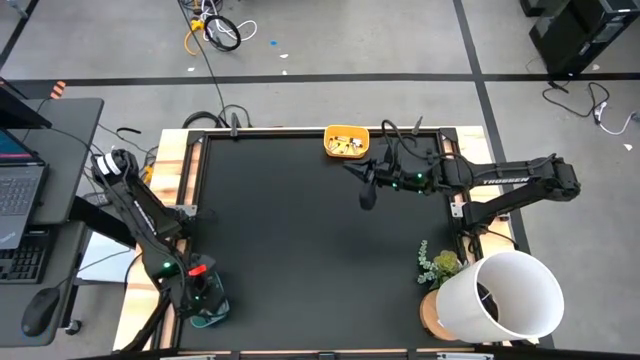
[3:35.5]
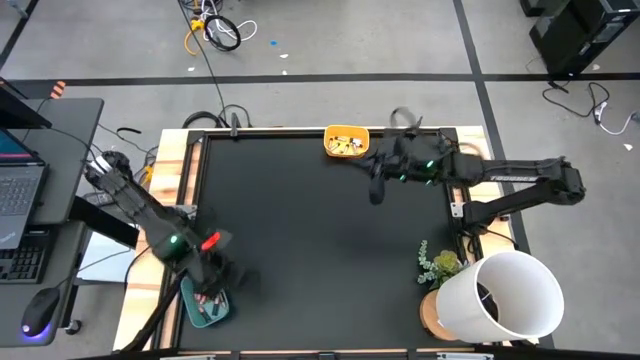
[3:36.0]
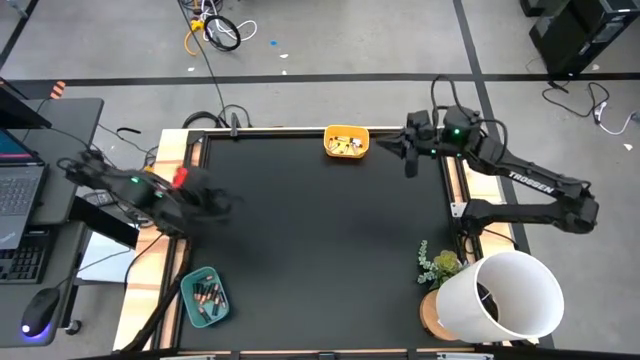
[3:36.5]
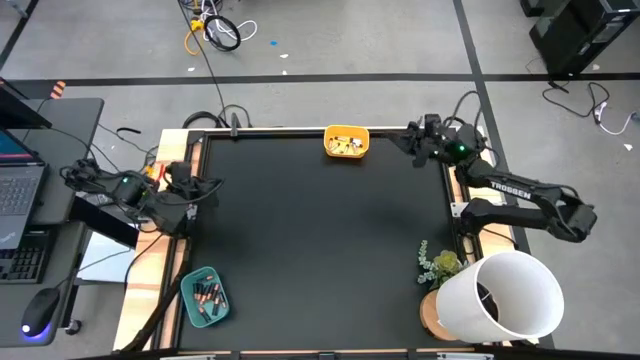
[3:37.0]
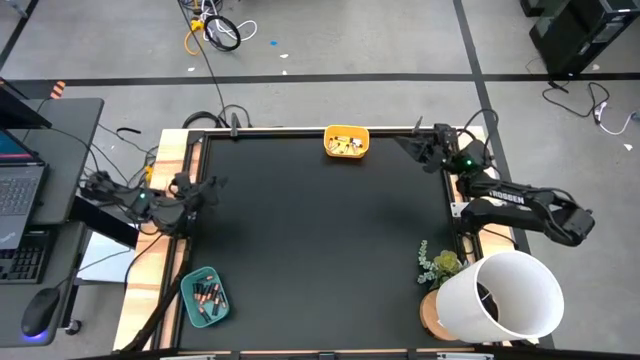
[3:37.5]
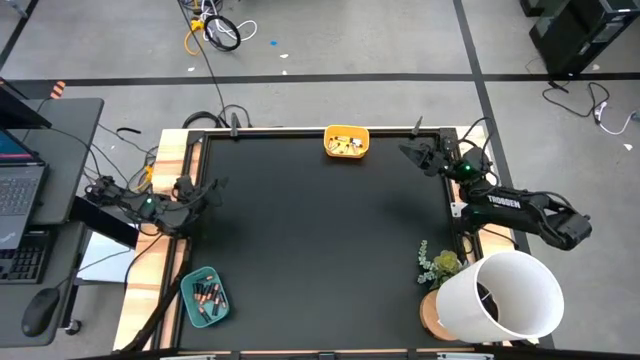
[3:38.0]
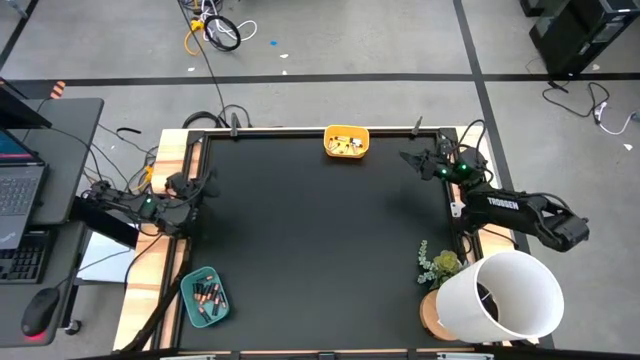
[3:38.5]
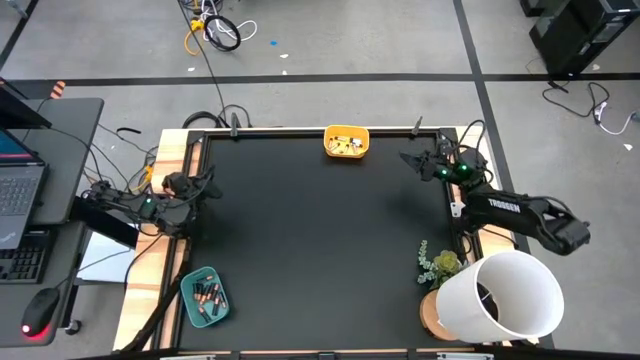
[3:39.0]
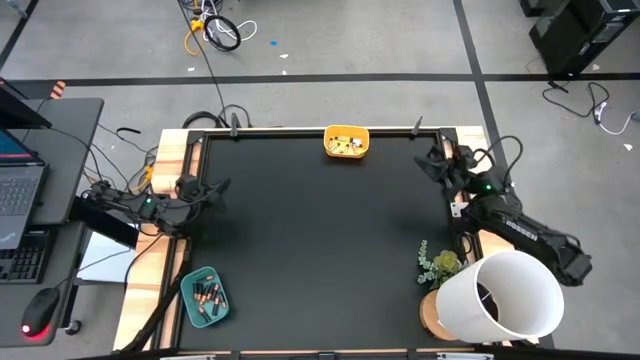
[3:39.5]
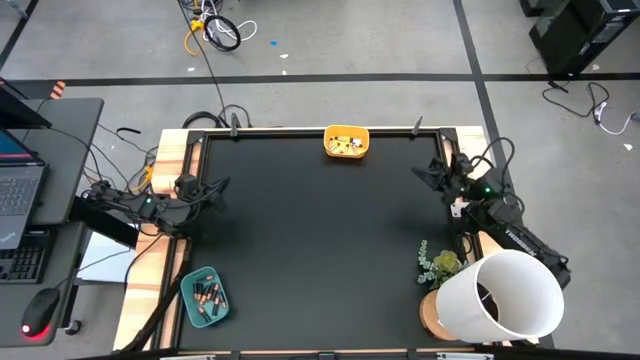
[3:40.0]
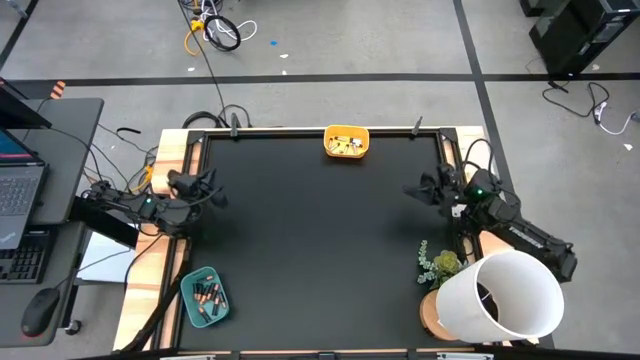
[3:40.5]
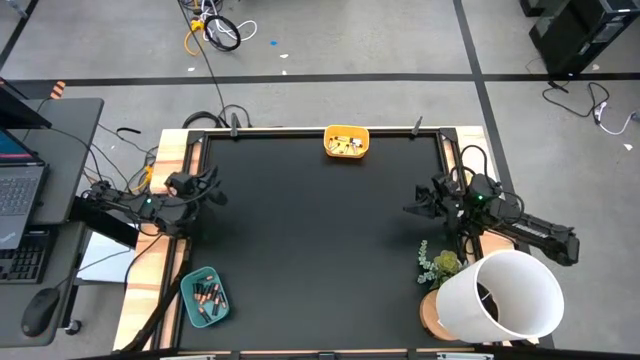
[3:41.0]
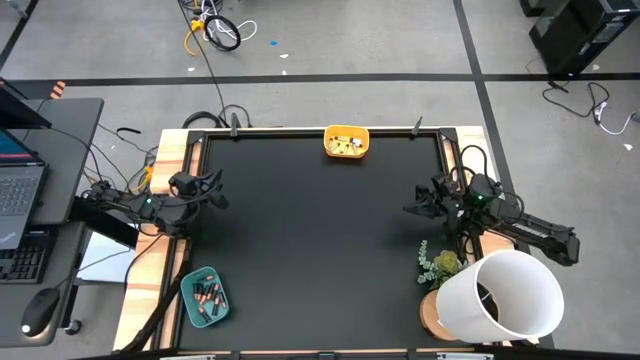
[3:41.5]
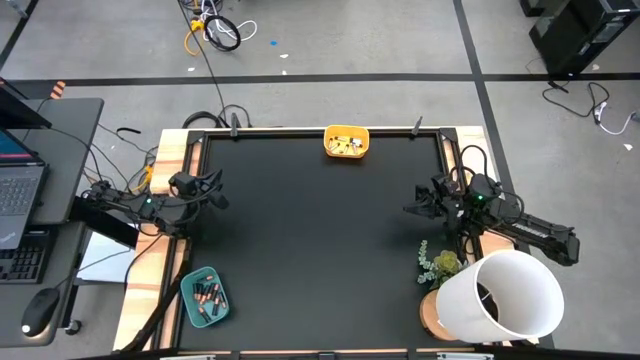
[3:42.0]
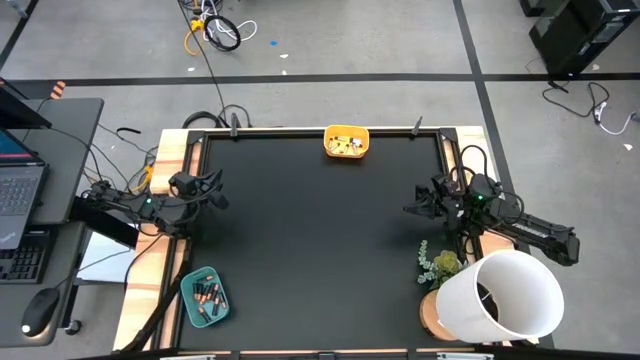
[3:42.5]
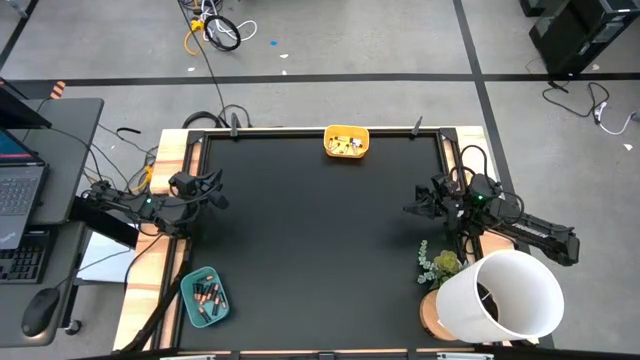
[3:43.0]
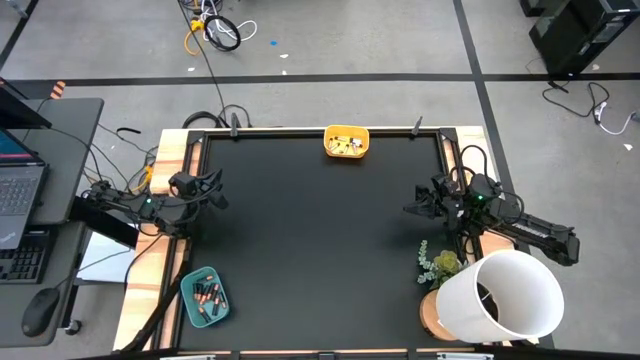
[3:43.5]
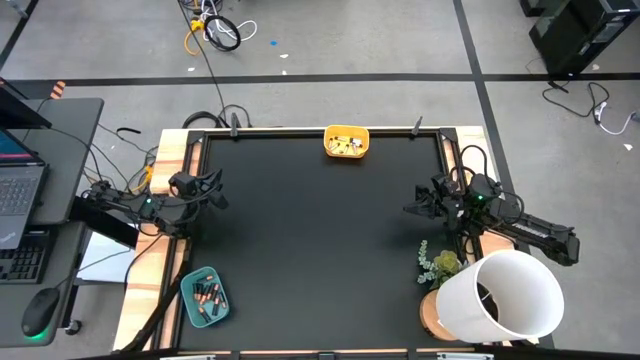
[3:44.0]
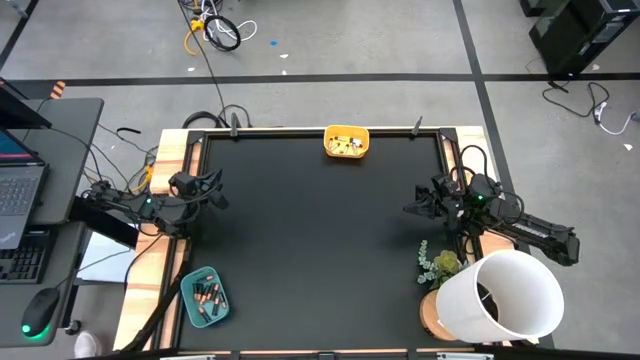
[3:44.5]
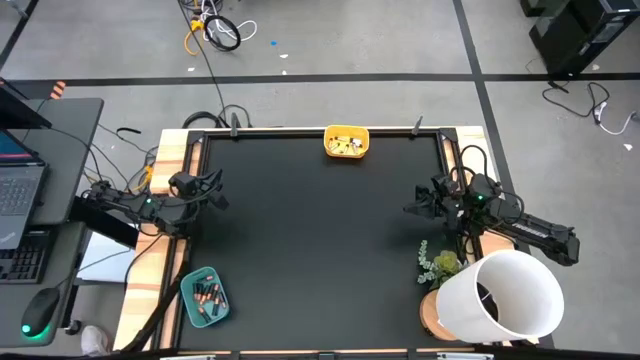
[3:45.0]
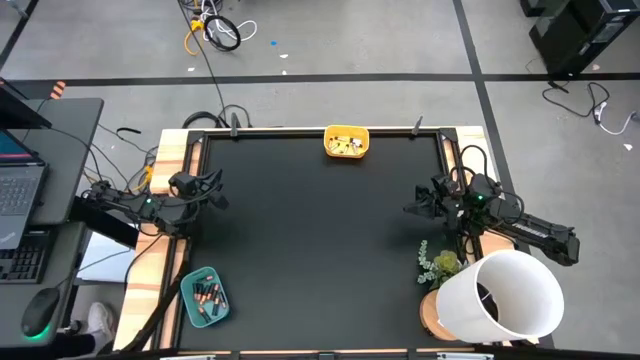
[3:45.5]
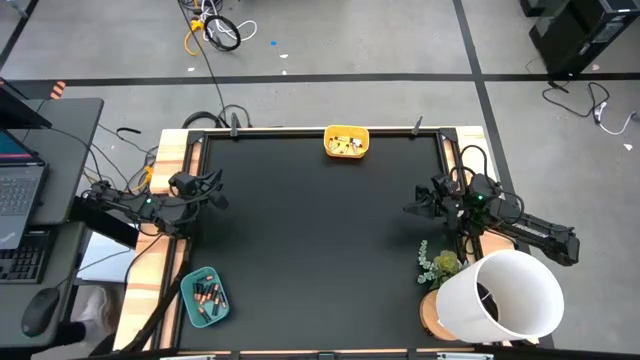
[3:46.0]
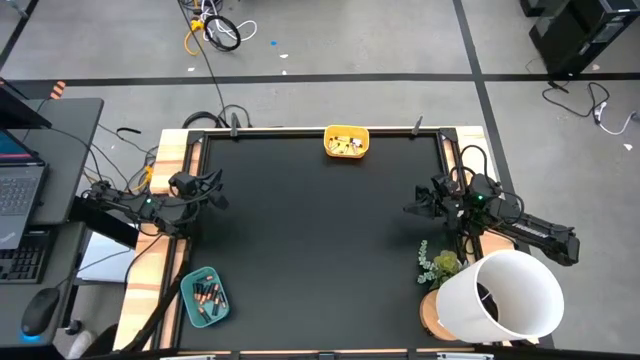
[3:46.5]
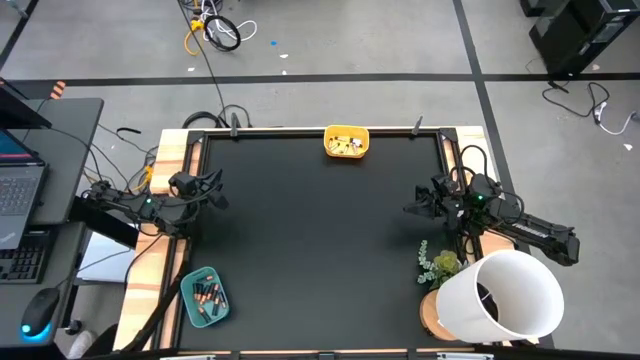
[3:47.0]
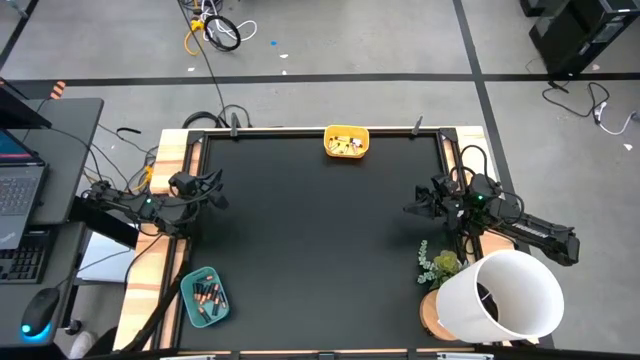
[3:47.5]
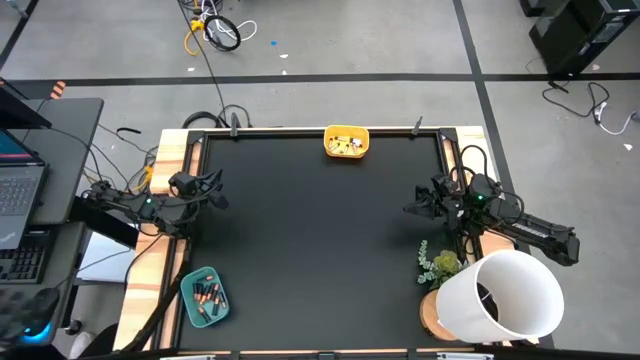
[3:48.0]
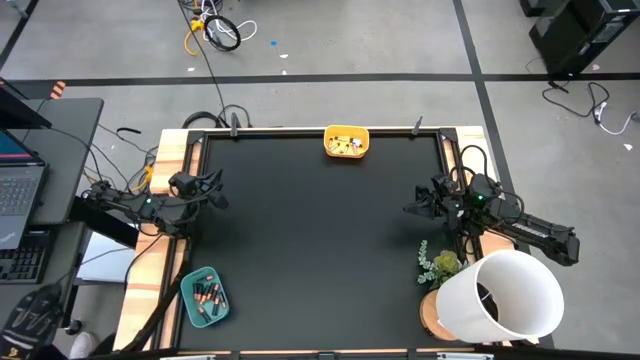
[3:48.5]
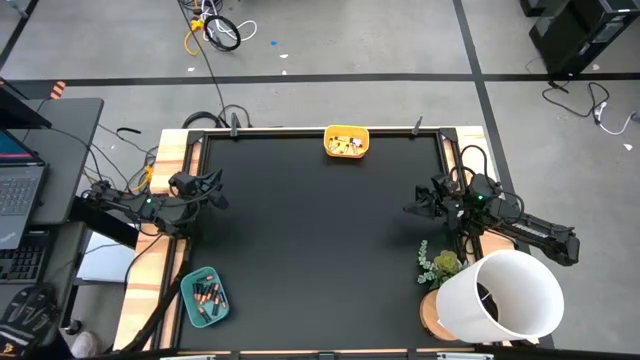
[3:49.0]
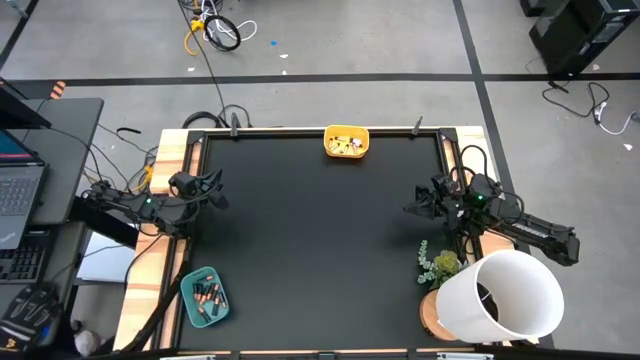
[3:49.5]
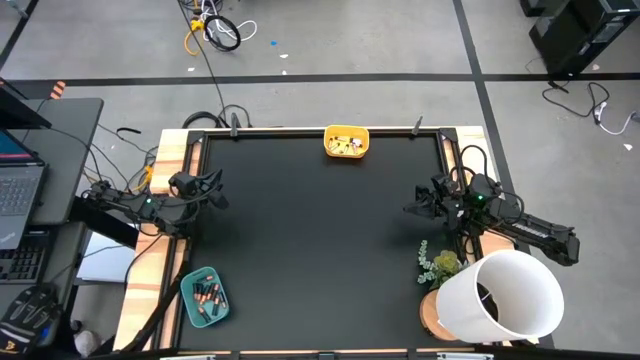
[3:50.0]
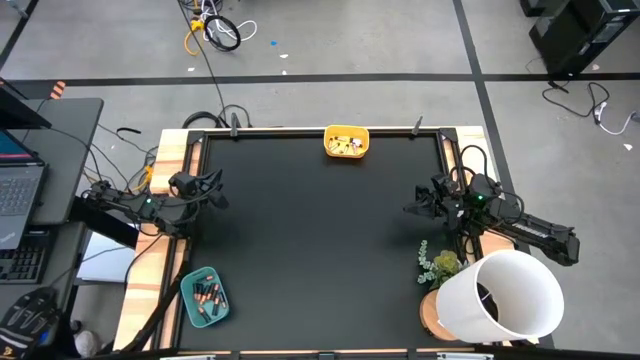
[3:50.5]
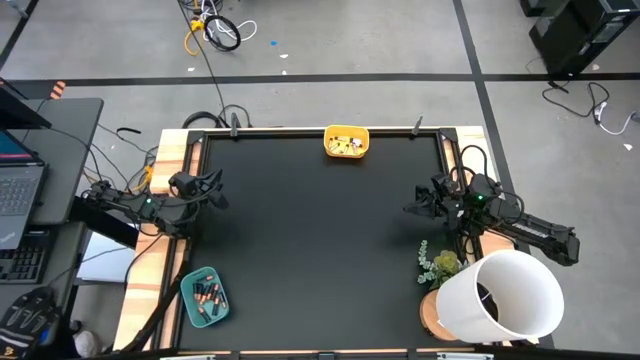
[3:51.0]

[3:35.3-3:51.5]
Task: Sort batteries
Return to Home Position

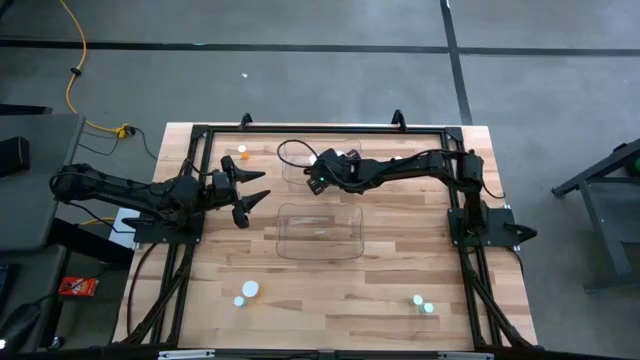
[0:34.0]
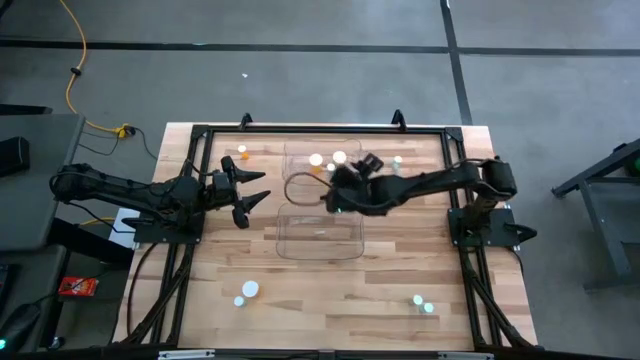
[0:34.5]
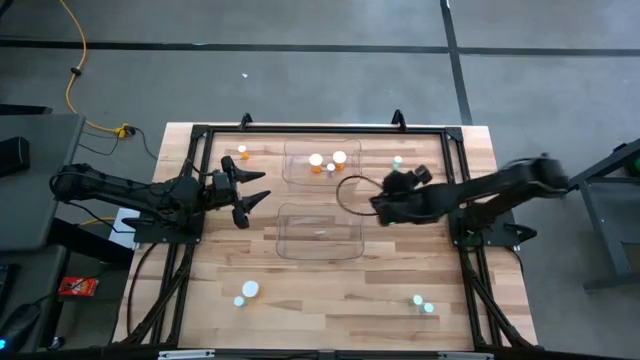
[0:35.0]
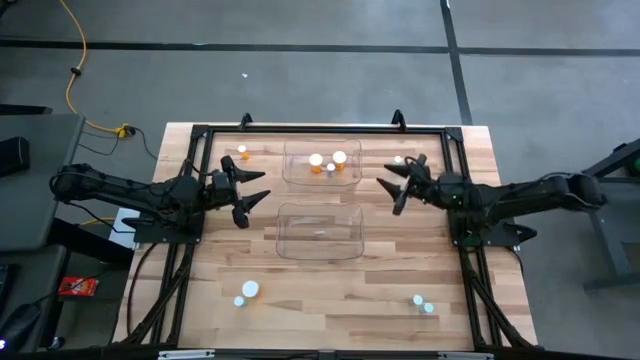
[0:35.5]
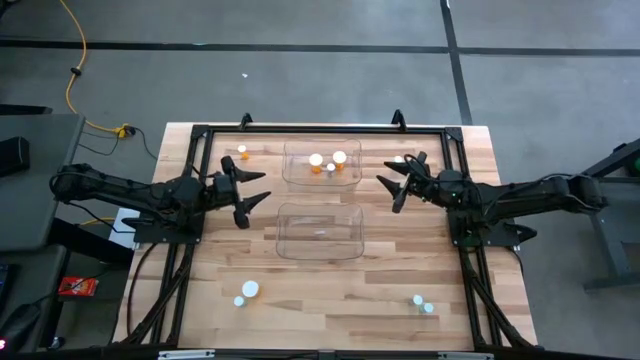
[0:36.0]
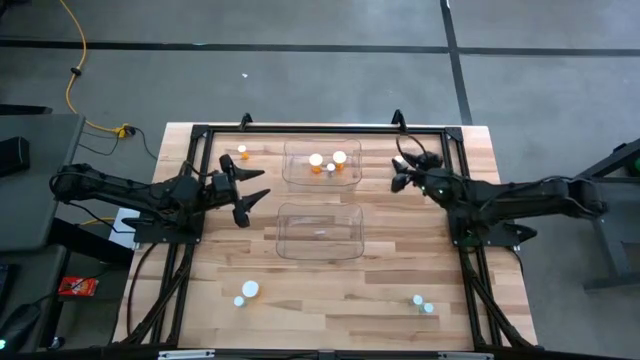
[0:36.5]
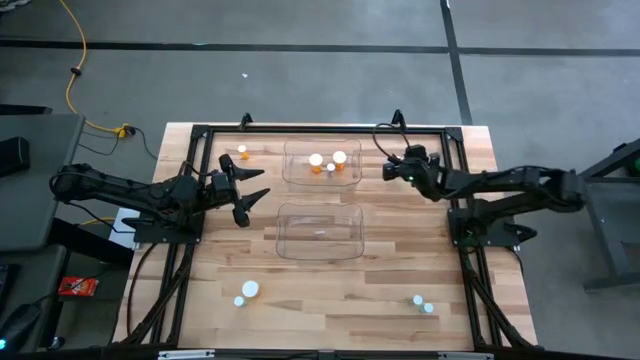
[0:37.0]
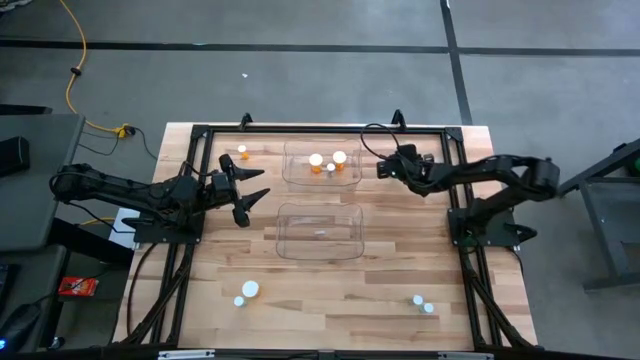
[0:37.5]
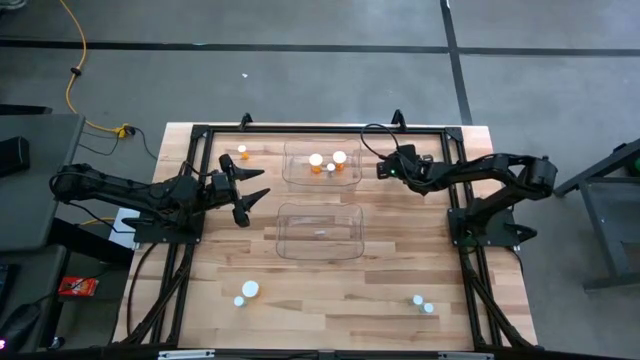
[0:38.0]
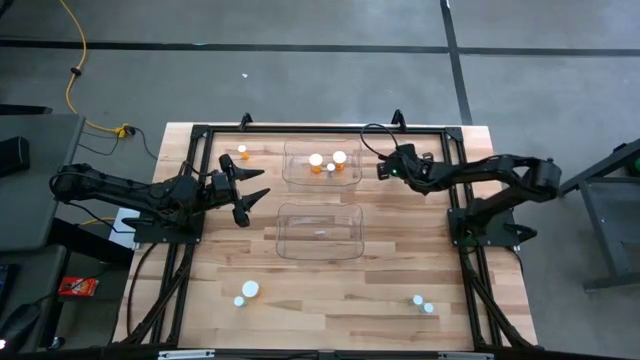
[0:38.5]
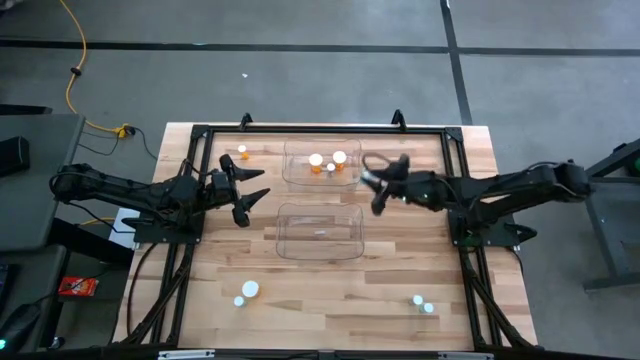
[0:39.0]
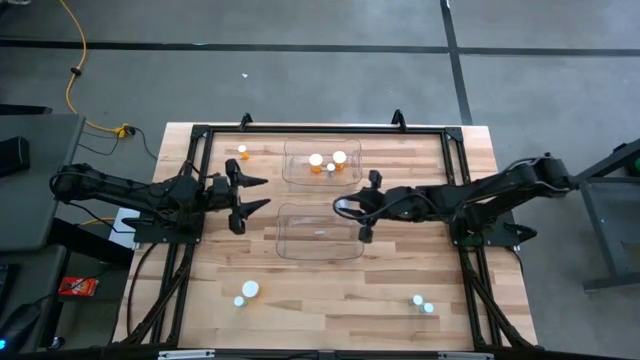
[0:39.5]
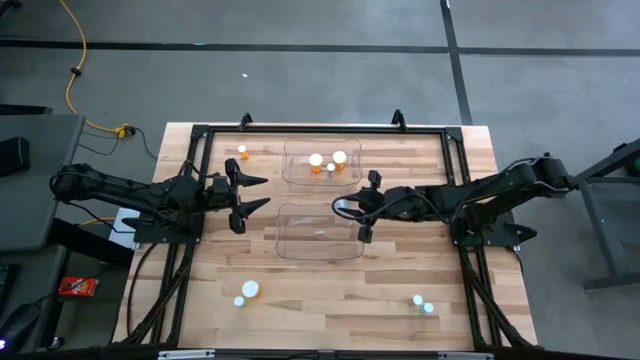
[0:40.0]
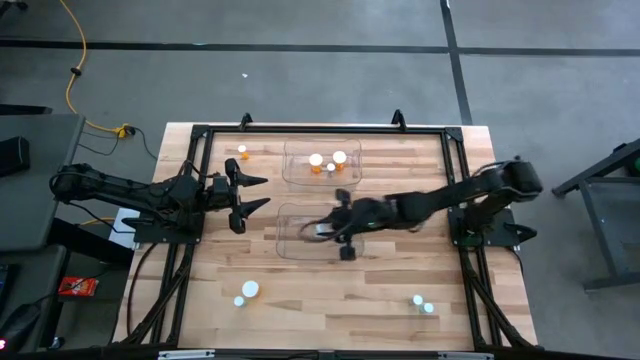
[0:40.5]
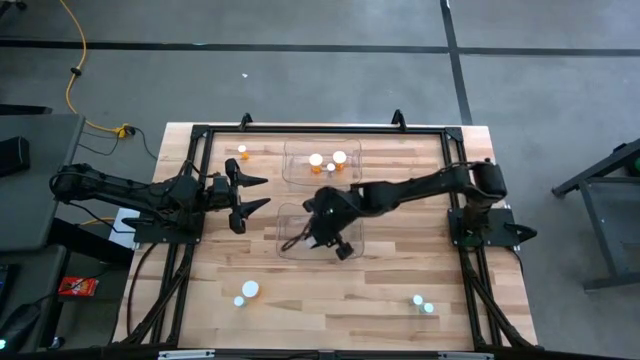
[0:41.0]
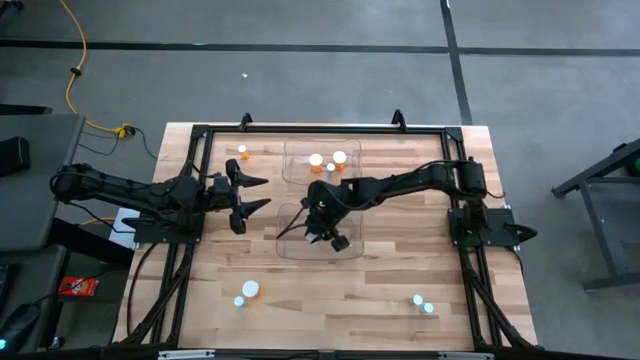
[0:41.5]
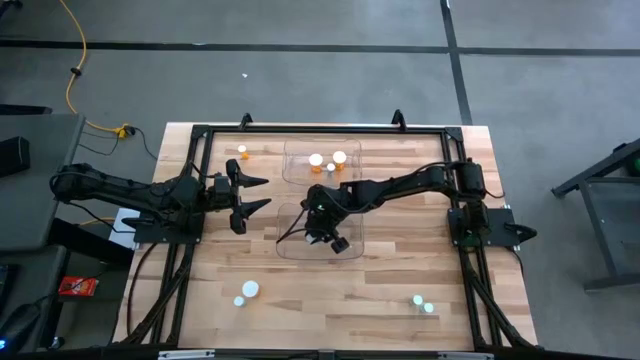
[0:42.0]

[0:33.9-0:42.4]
Task: Pick and place medicine bottles into bin by pill shape (circle, oval)
Put the blue tablet bottle into the bottom transparent bin
